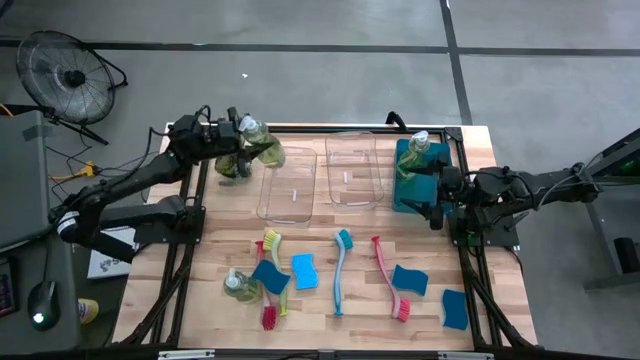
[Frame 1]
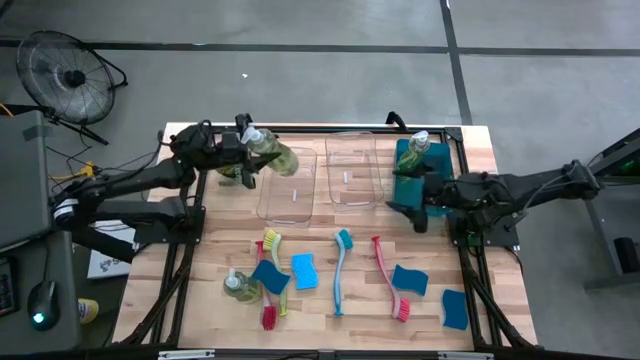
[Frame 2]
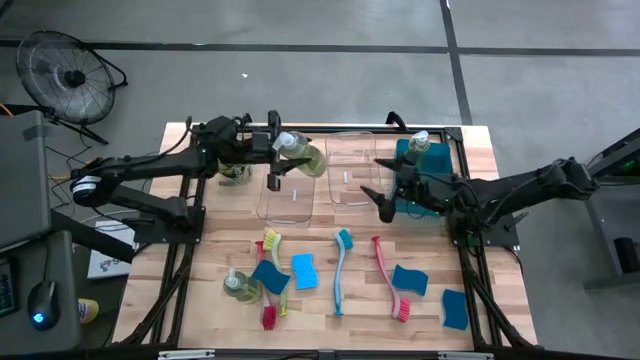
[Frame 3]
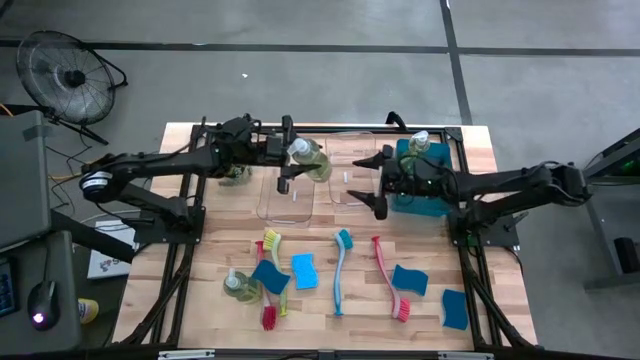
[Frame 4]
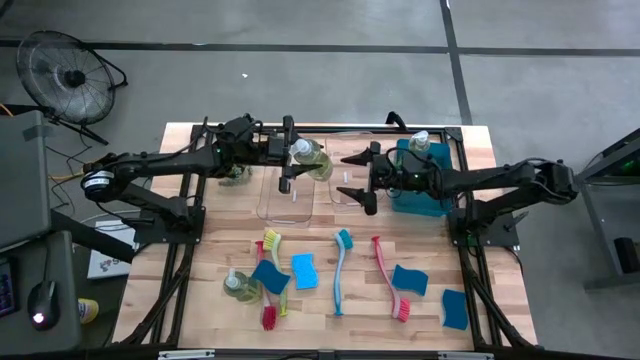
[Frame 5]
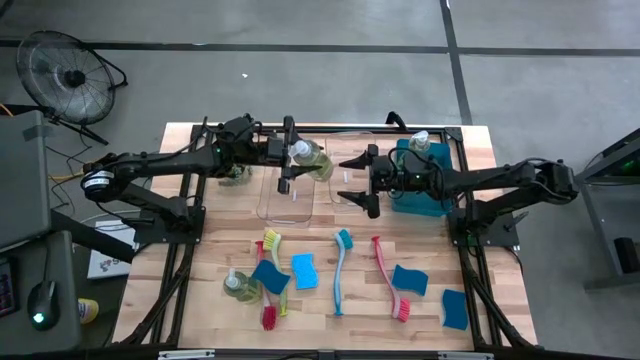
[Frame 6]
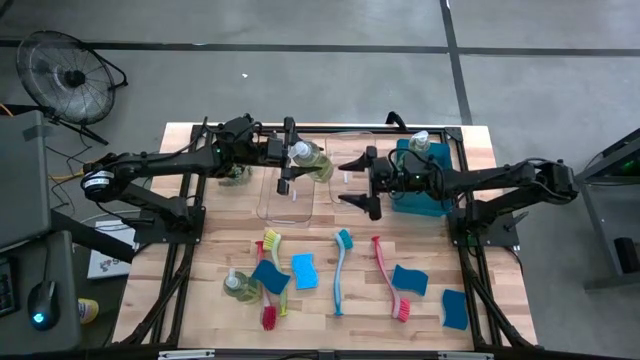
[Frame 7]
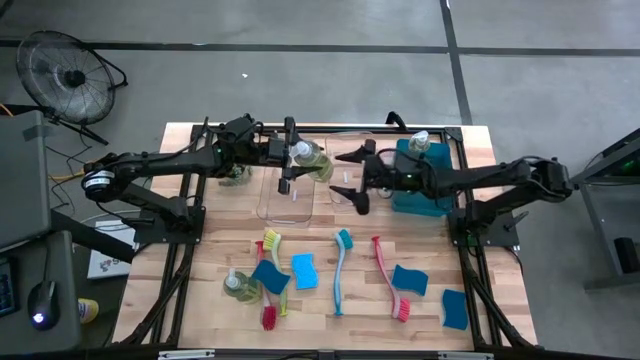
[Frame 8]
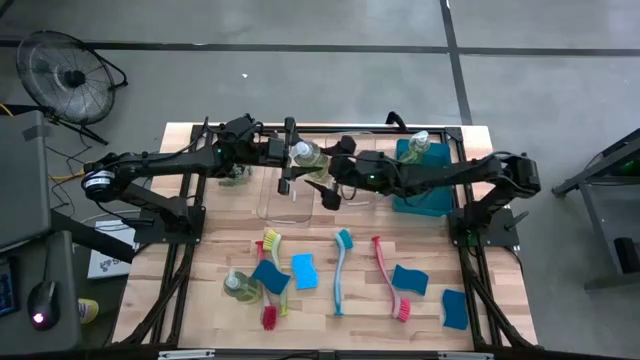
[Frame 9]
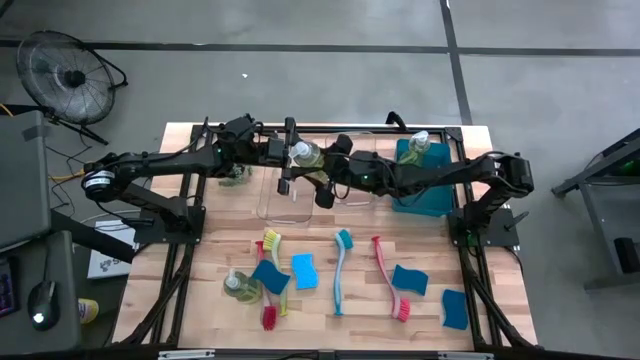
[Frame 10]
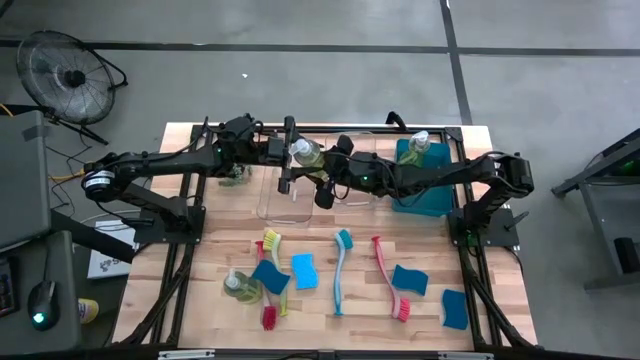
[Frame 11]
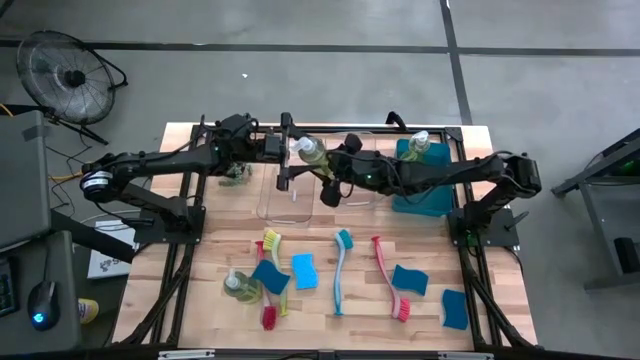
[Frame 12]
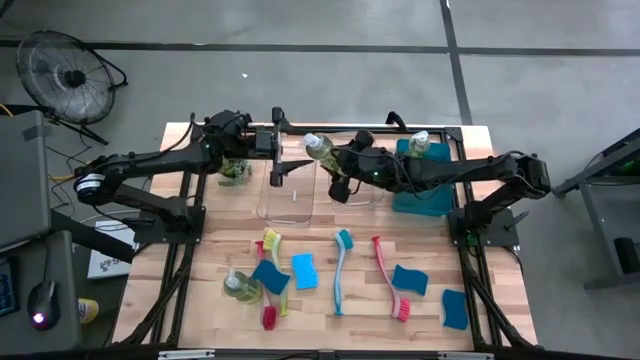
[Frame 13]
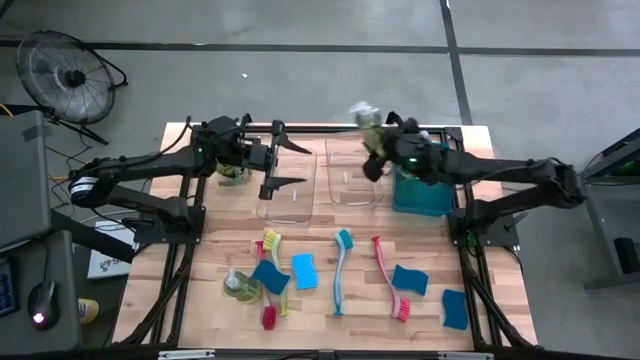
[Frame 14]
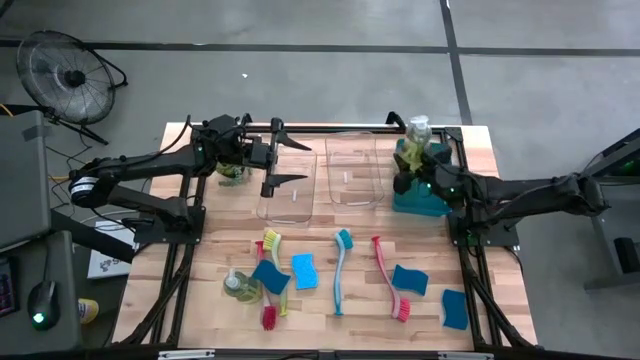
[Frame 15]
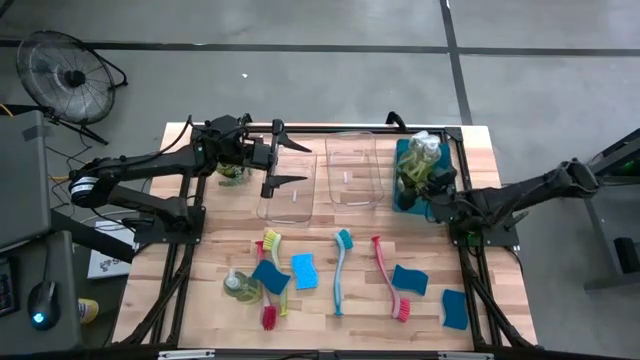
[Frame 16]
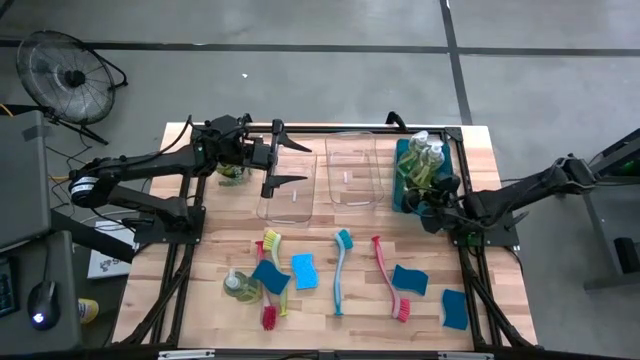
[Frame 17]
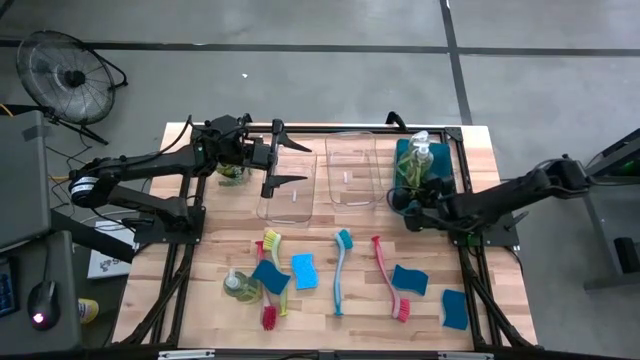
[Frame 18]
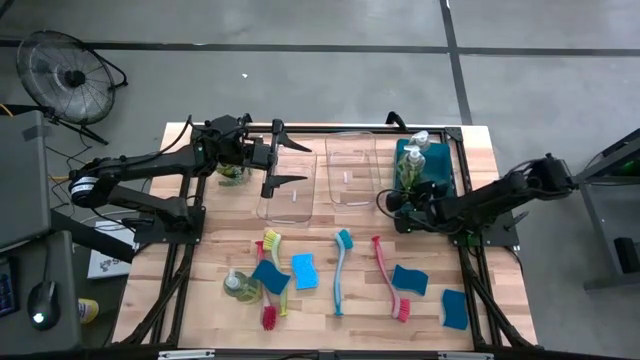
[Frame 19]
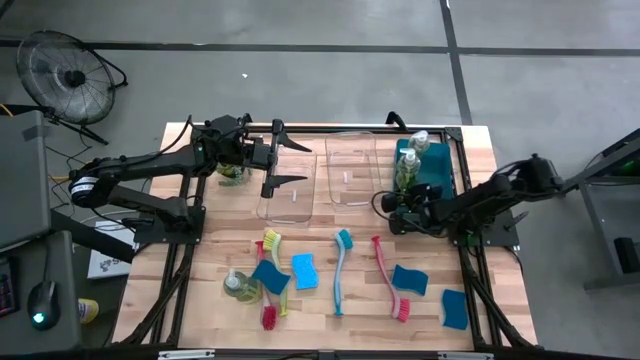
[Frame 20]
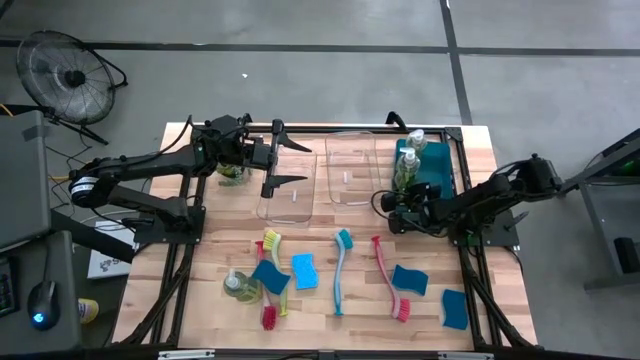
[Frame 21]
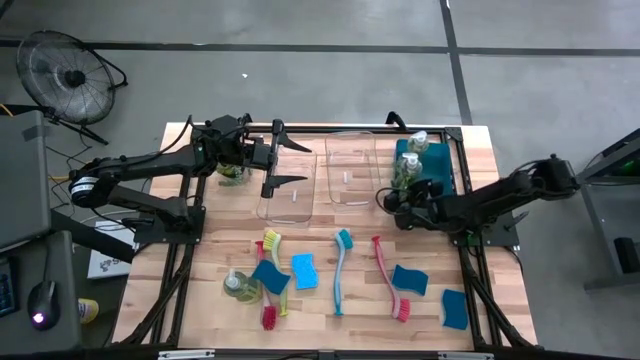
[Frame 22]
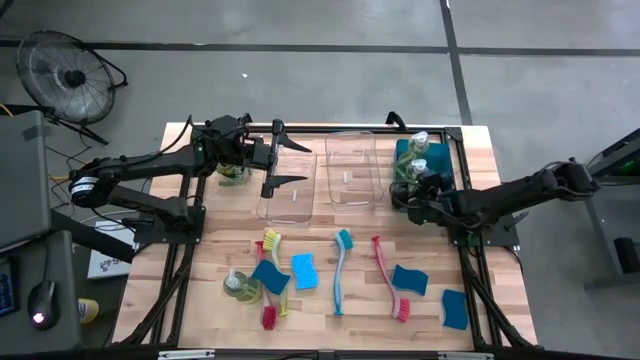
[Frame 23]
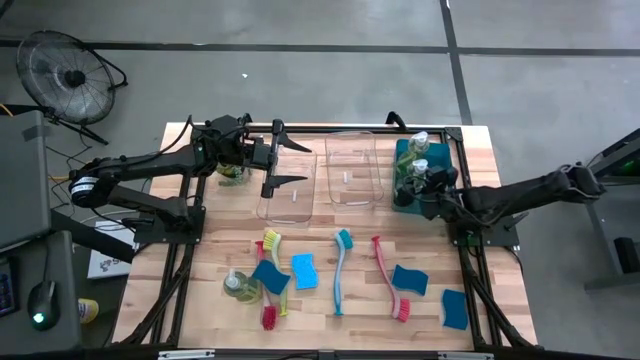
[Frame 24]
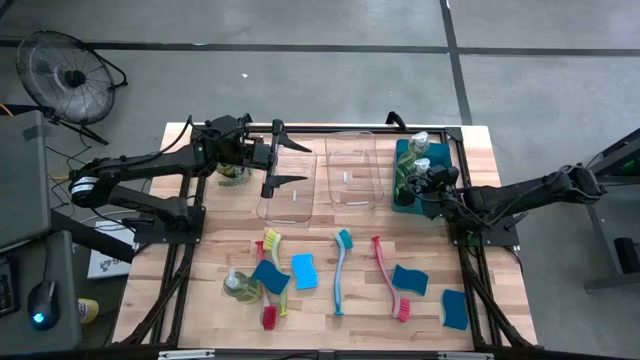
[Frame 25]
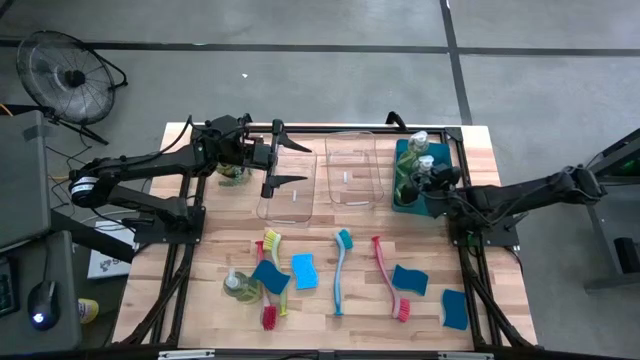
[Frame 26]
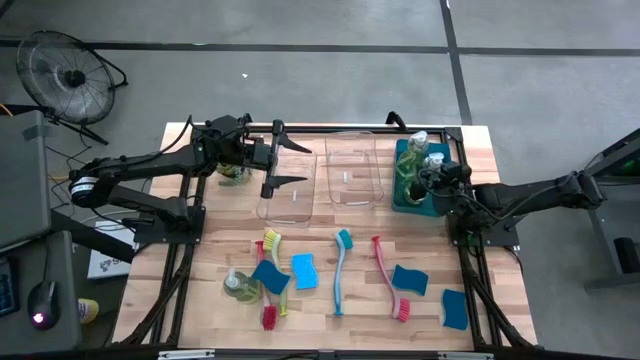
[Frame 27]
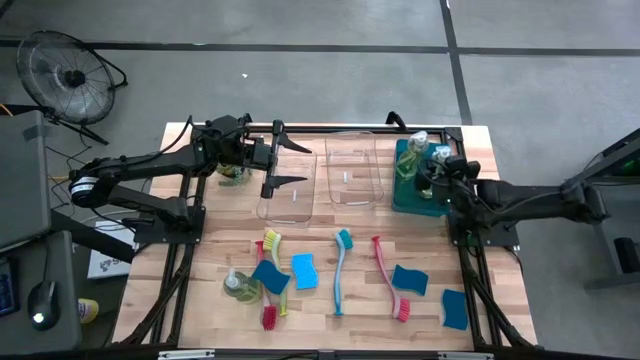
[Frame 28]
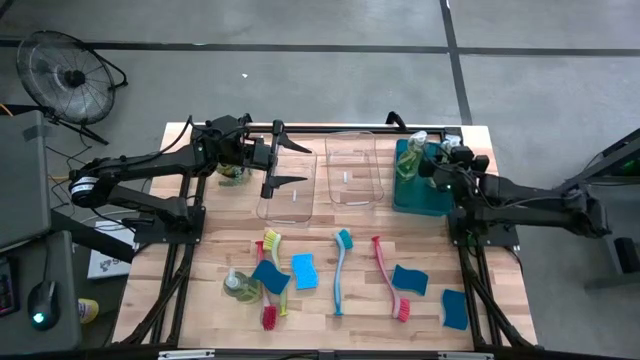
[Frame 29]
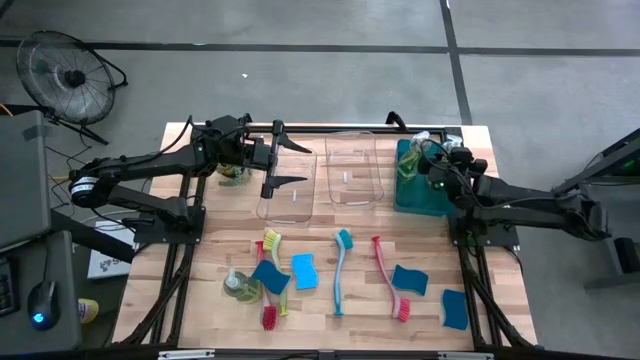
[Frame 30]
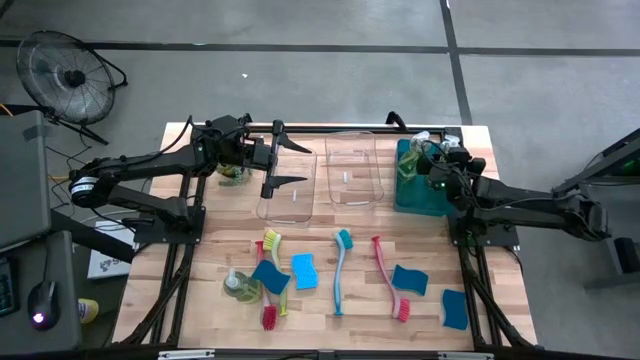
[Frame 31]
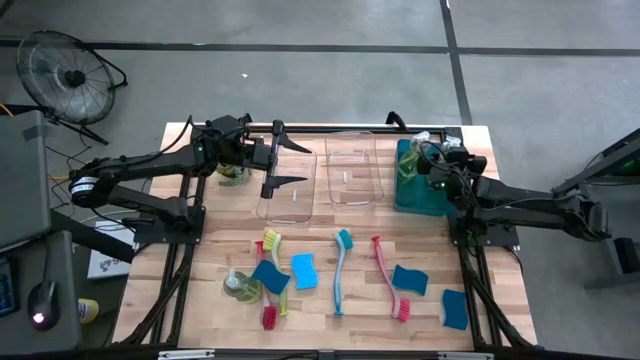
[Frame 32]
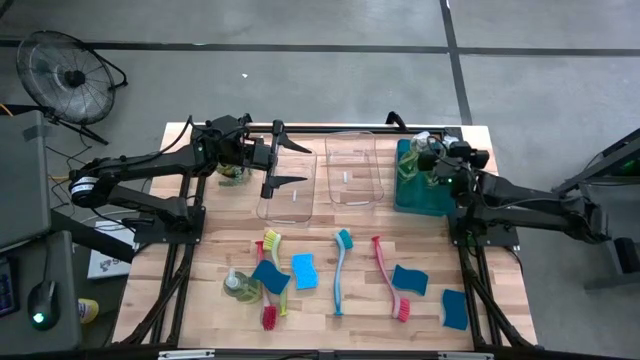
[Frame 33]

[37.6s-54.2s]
Task: Pick & Place Kitchen Sink Supplies
Put the top green dishwashing liquid dispenser into the blue bin

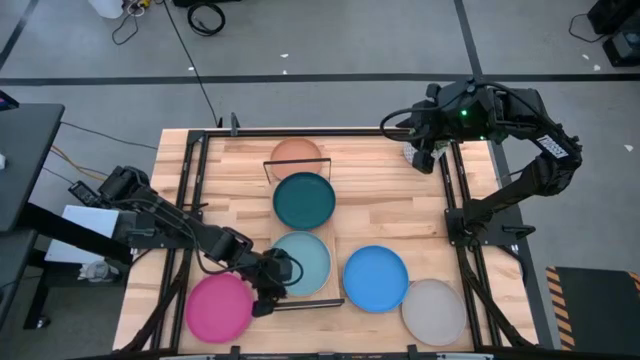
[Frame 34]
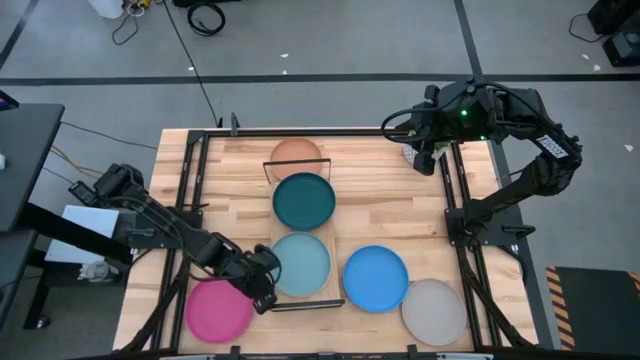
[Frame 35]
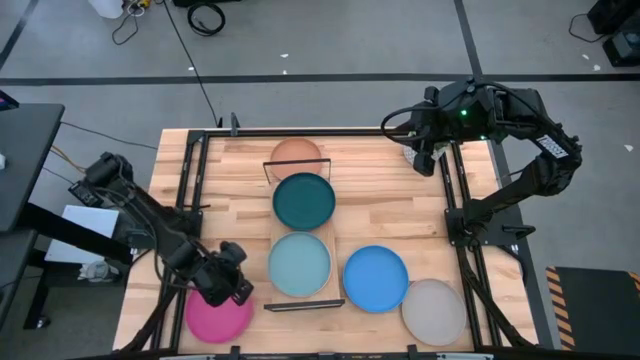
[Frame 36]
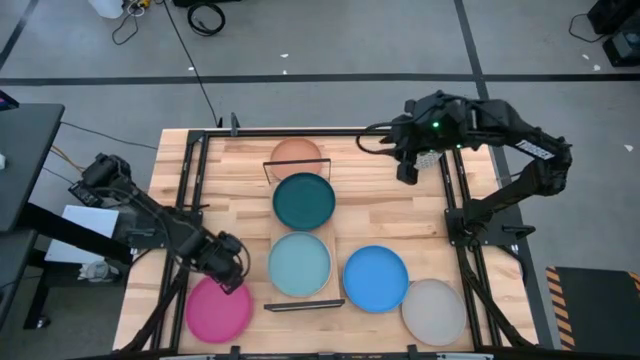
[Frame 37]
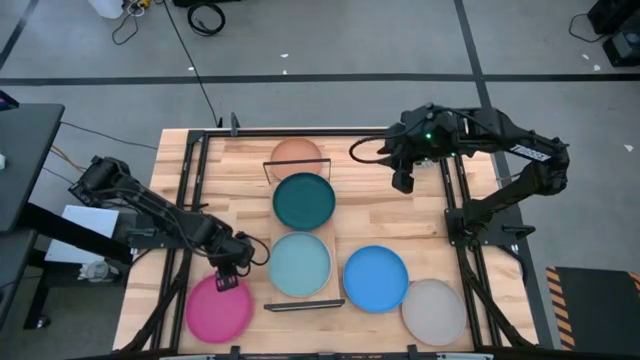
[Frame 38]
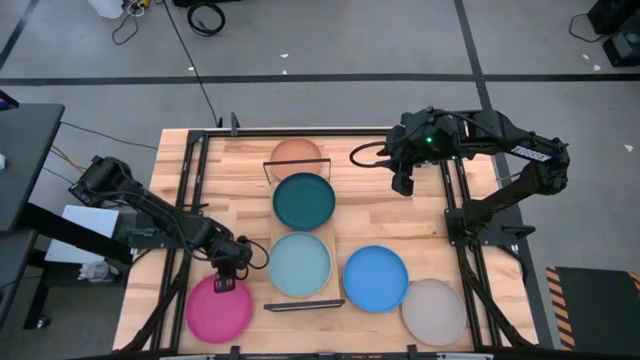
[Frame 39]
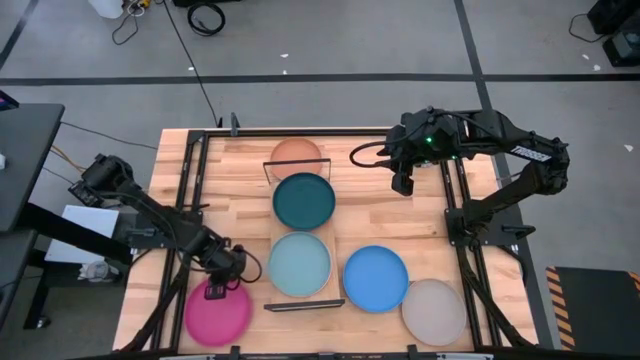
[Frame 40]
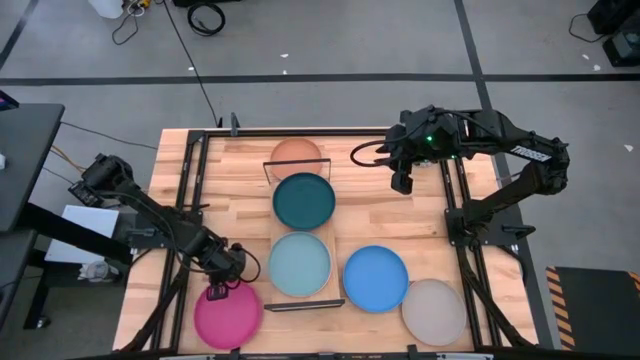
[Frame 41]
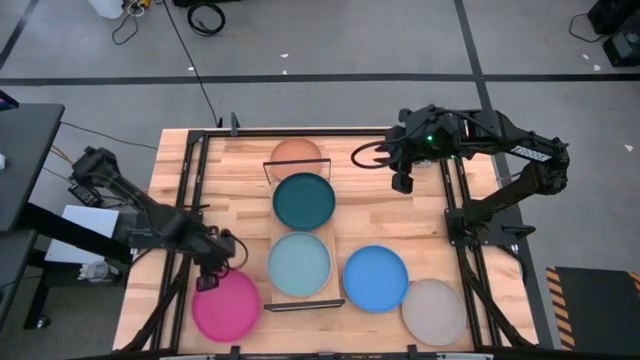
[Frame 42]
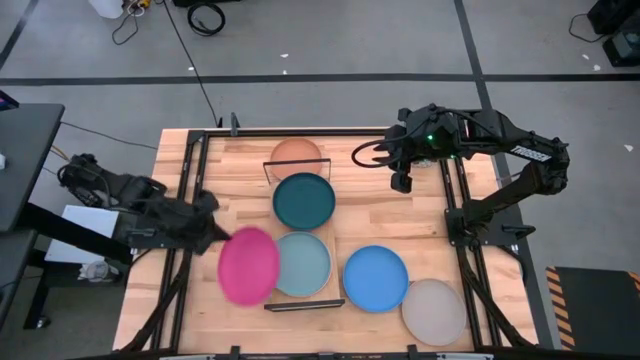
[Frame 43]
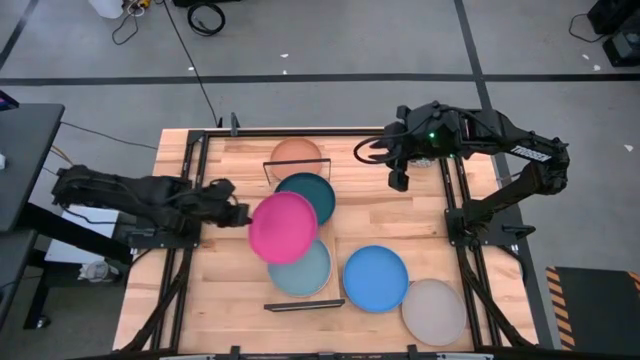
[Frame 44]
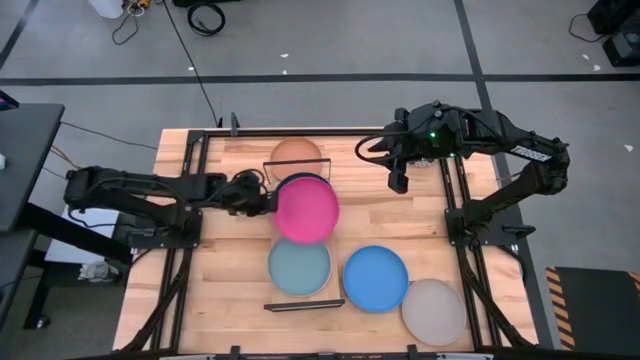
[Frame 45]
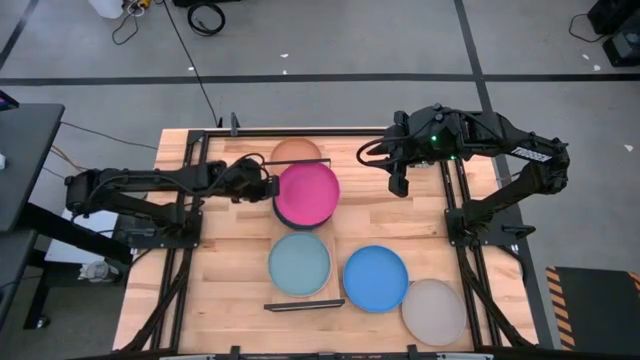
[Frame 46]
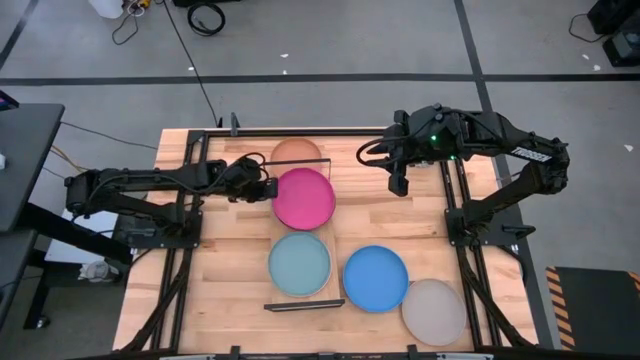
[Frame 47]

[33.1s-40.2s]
Task: Place and stack plates onto a shelf
Stack the pink plate on top of the dark green plate on the shelf
